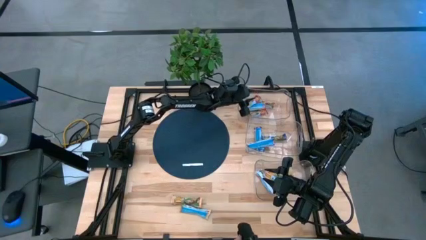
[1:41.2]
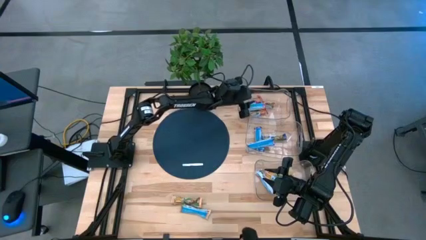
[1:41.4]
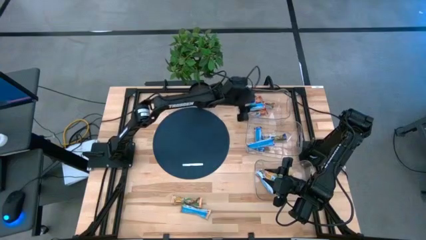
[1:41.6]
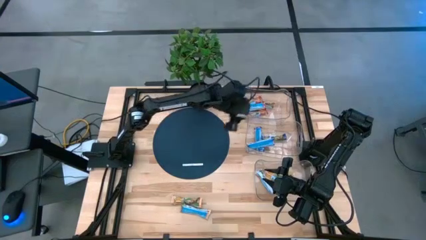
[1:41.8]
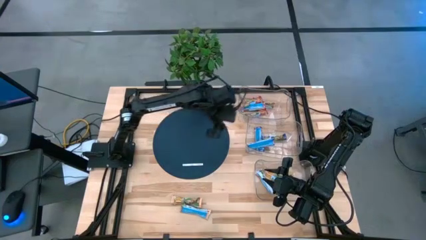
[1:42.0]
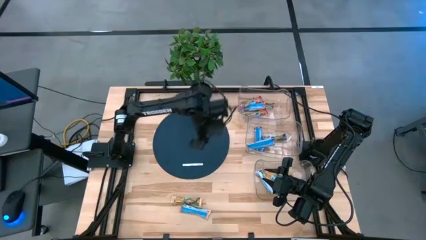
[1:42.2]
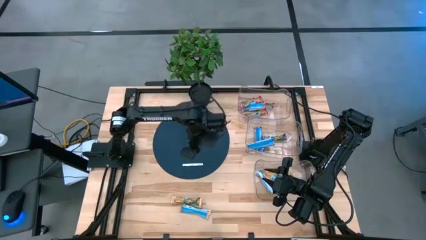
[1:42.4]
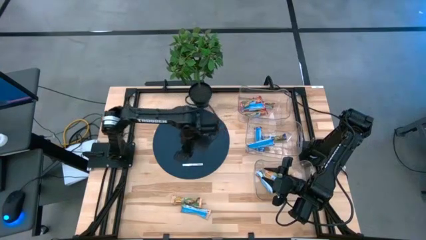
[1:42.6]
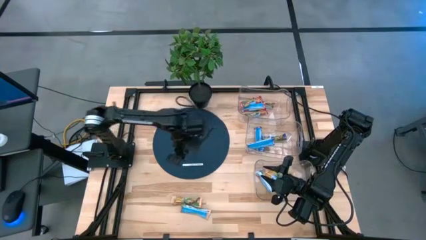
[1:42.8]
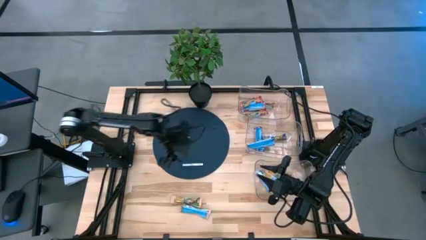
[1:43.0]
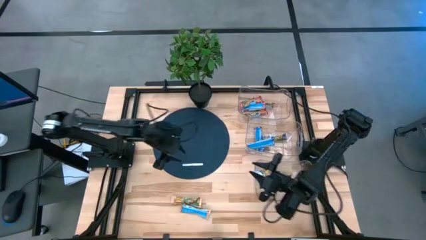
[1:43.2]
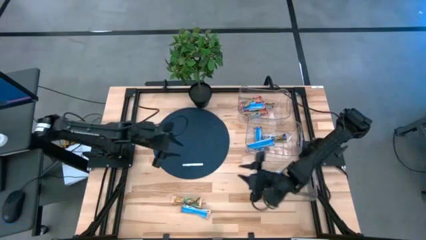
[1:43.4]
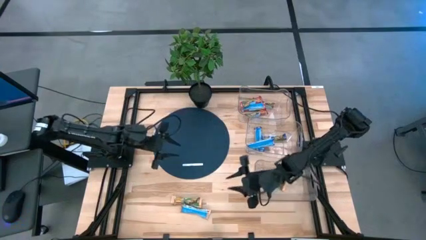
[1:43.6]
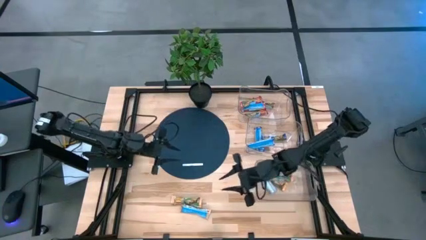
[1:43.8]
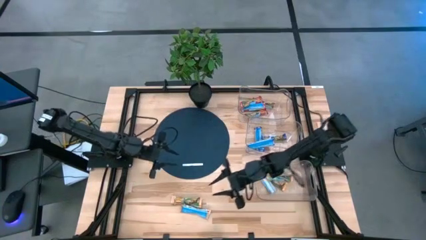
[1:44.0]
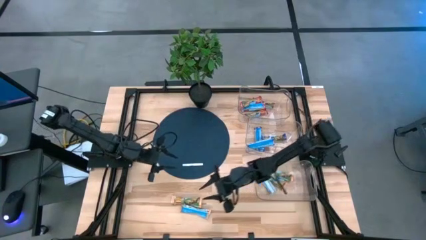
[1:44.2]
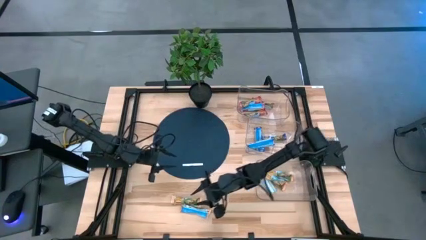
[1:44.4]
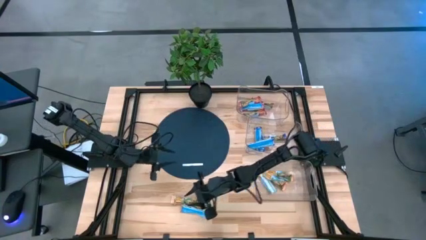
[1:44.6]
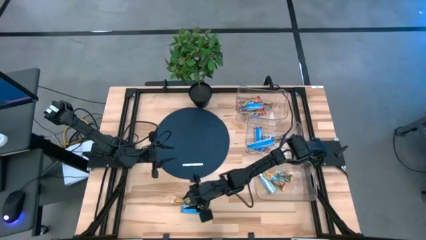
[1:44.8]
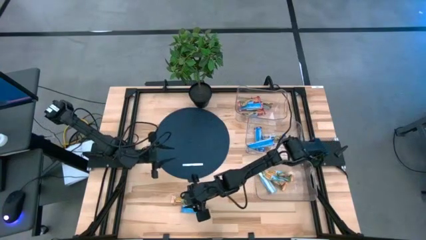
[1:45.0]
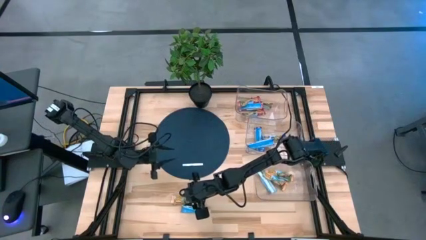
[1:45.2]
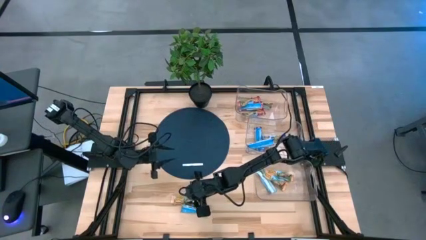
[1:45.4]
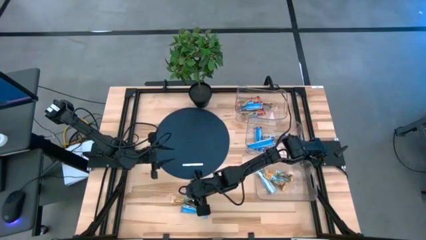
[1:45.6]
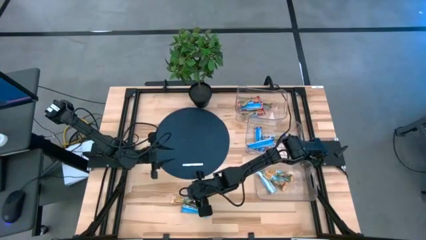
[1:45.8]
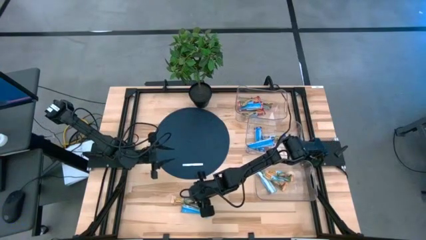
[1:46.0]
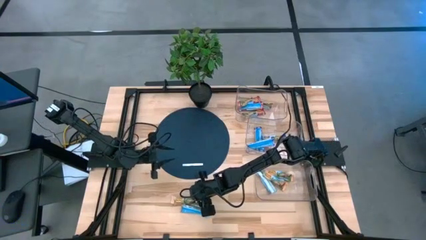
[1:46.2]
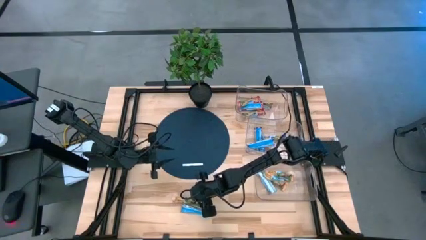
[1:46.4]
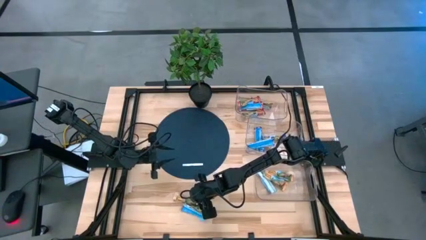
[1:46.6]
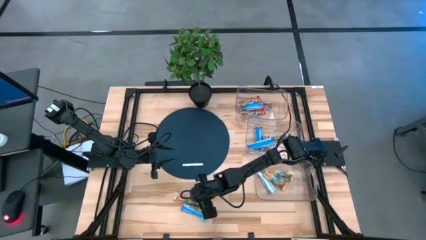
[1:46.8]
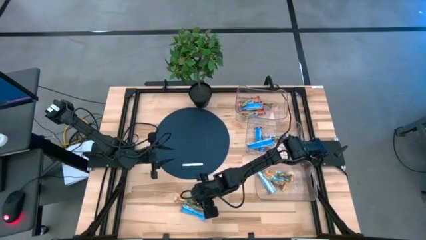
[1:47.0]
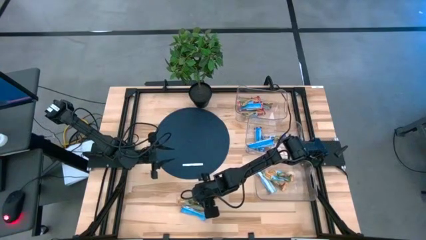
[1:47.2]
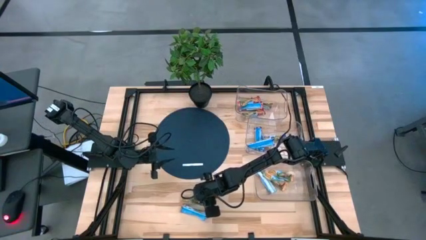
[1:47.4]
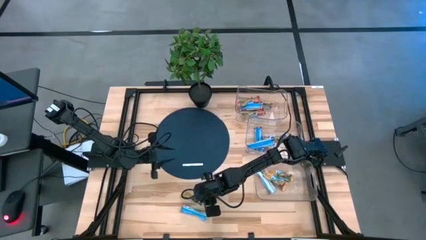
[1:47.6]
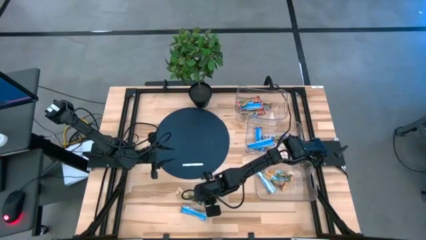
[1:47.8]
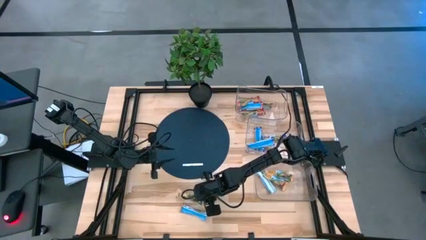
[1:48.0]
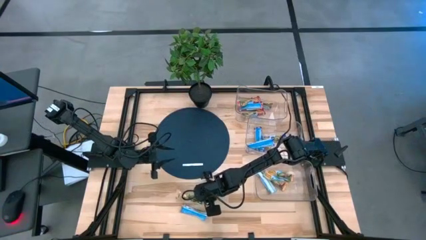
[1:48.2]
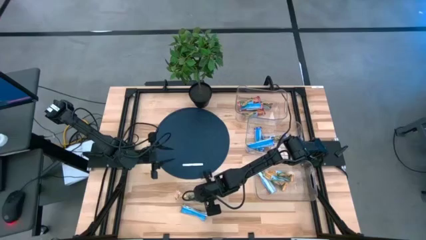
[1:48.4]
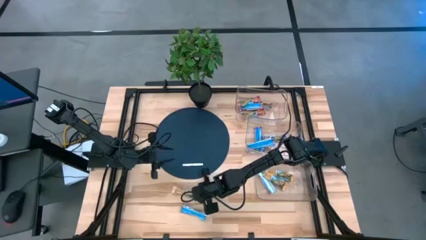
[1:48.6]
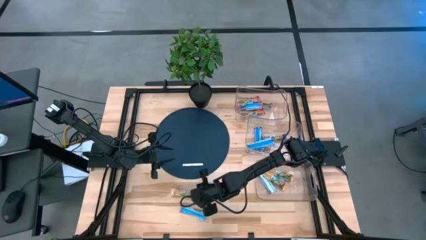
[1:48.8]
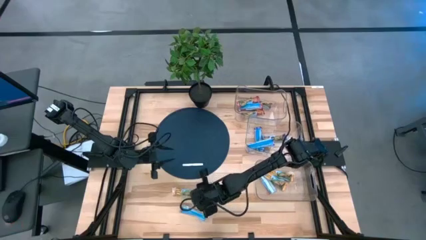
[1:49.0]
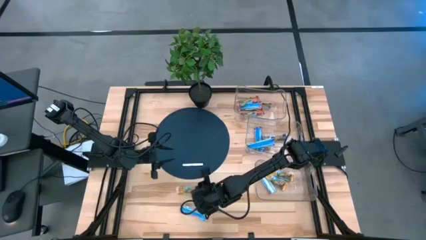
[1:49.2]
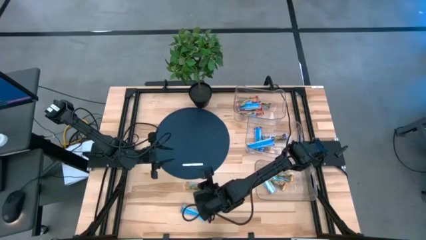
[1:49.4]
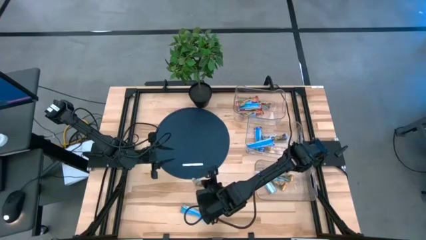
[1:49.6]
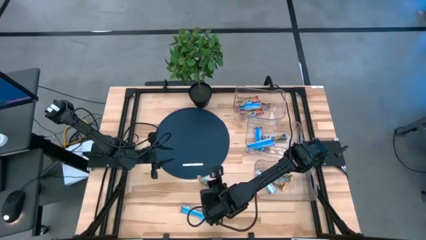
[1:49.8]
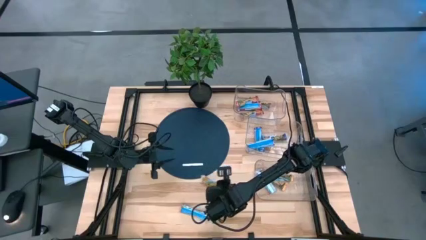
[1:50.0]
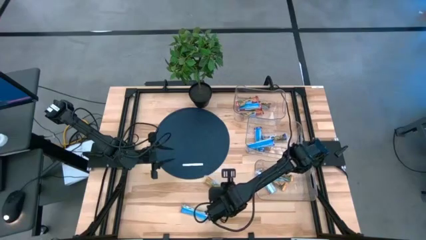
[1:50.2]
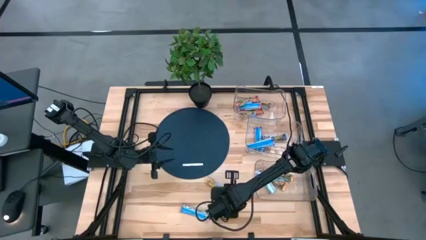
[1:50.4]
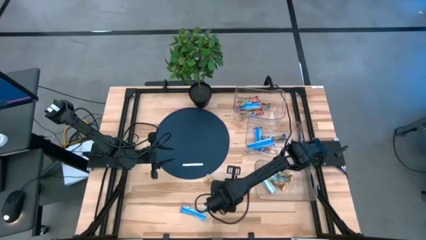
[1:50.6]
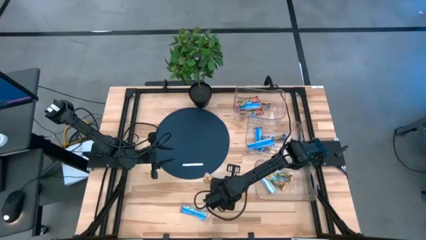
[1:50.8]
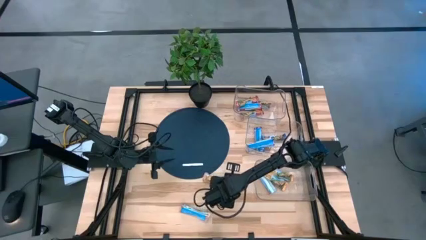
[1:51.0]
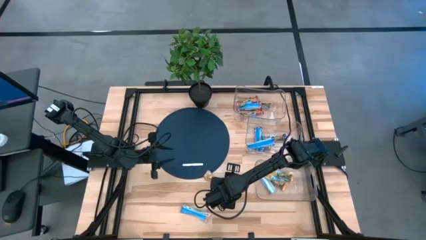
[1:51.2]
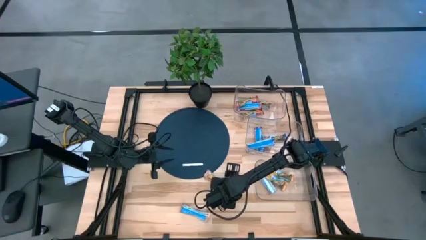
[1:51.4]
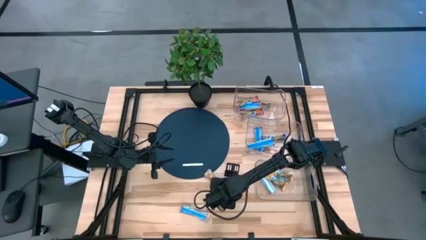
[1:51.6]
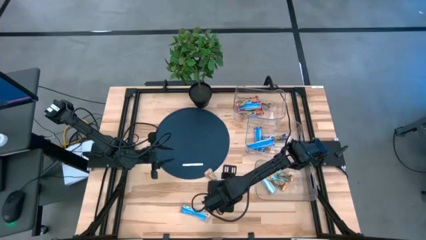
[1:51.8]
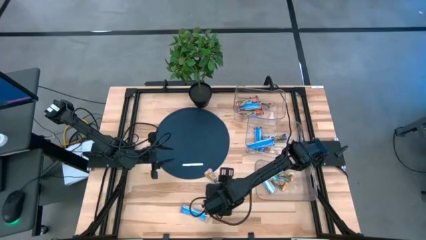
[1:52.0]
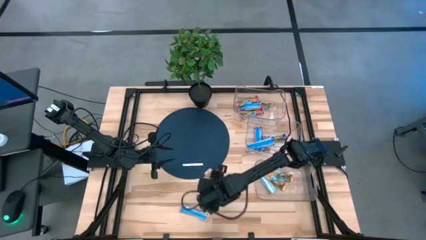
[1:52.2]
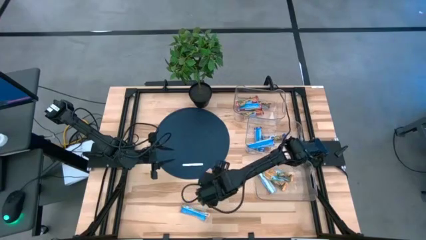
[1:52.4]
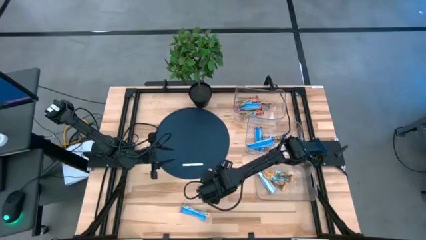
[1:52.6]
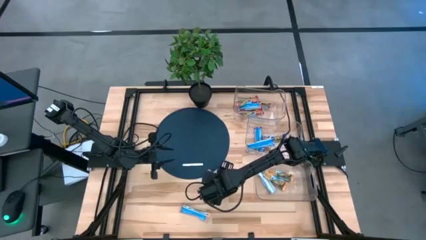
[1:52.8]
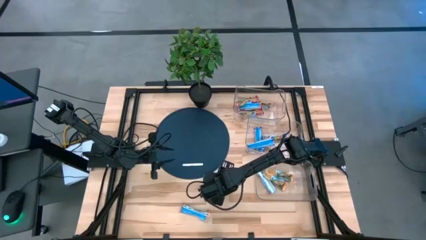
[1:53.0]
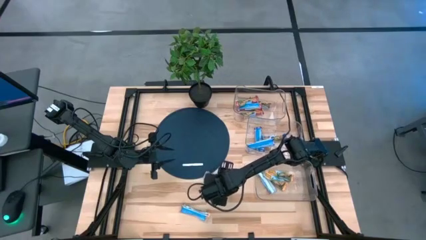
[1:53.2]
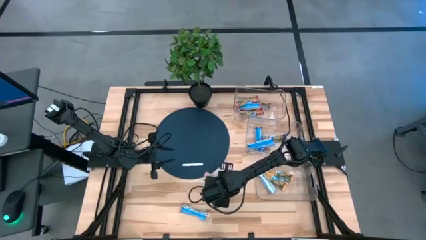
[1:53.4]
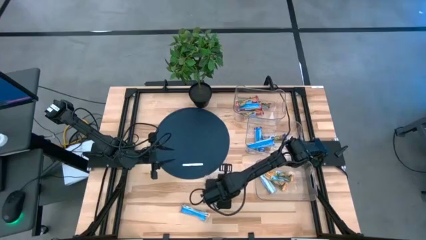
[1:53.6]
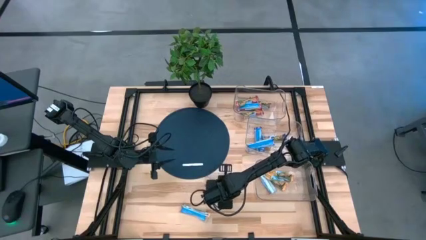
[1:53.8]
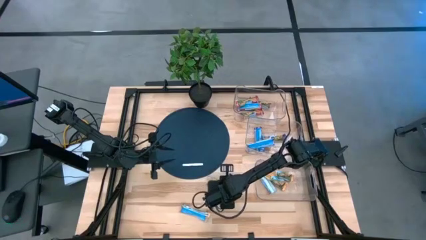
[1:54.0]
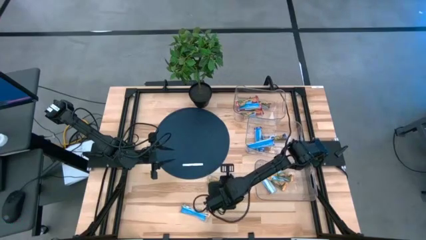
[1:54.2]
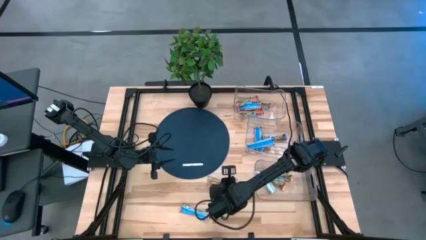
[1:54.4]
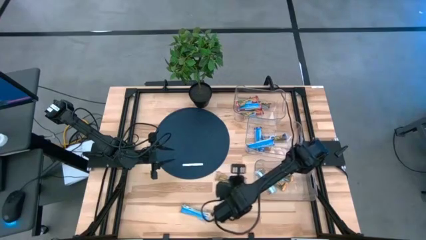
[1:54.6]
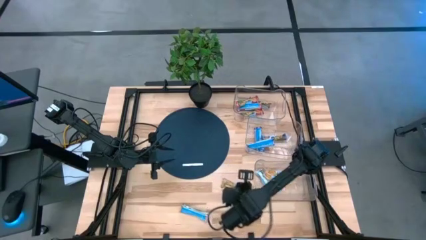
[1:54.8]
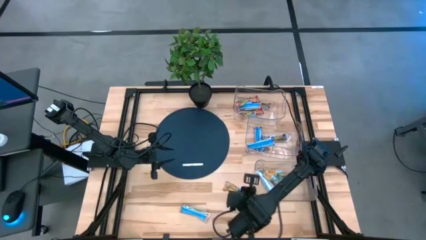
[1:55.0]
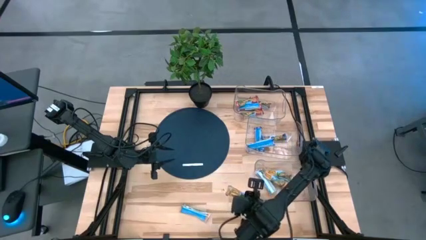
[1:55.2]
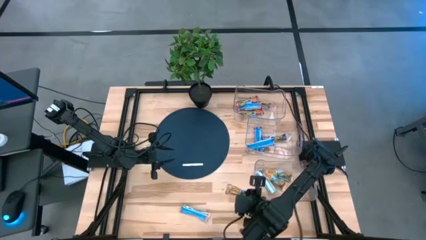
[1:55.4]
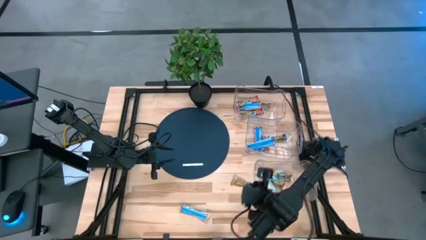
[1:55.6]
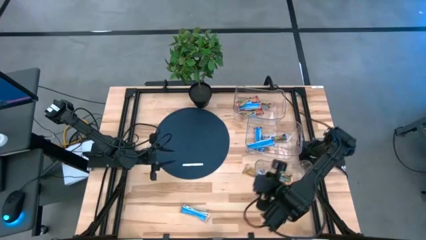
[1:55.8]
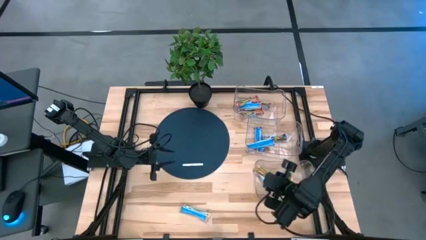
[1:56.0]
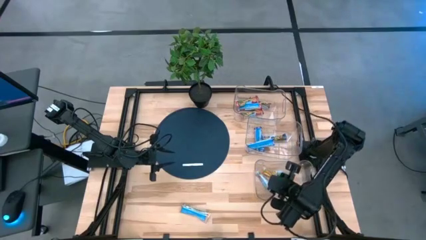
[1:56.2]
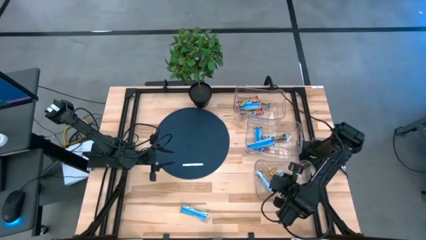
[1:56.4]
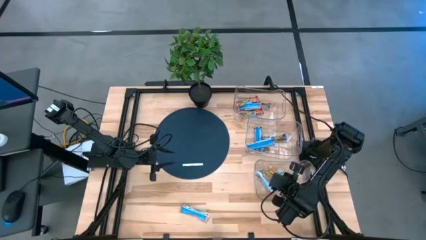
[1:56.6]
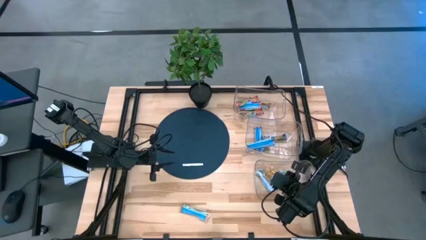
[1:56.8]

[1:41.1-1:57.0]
Task: Pick and place Granola Bars by type
Put the yellow granola bar into the bottom transparent bin

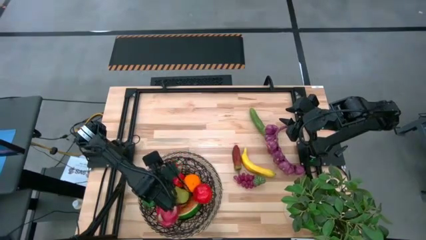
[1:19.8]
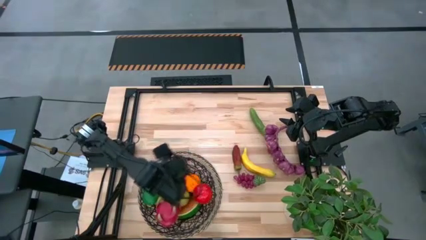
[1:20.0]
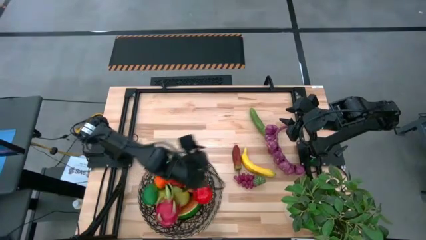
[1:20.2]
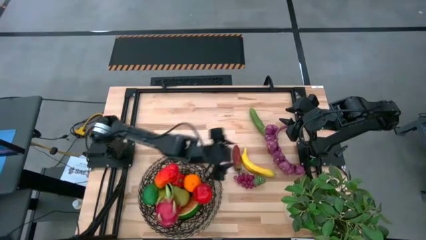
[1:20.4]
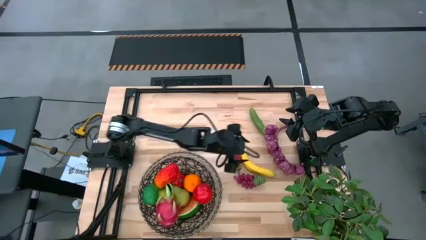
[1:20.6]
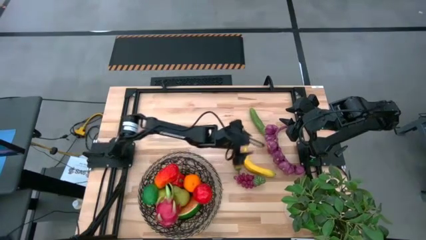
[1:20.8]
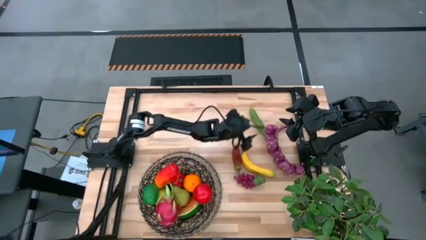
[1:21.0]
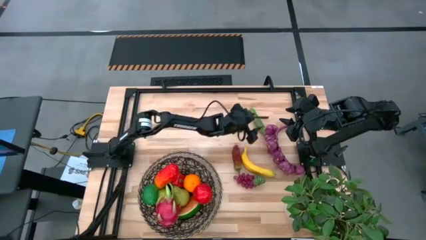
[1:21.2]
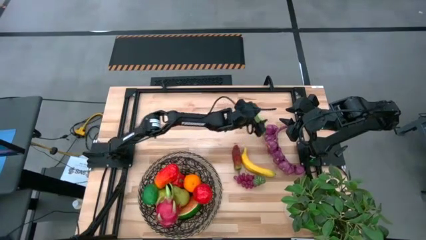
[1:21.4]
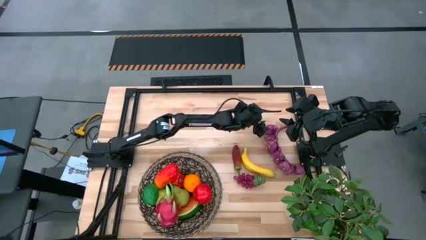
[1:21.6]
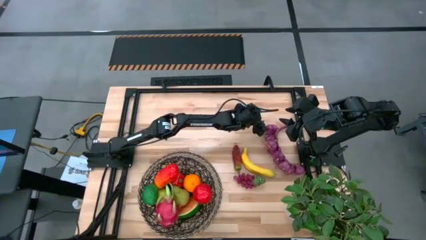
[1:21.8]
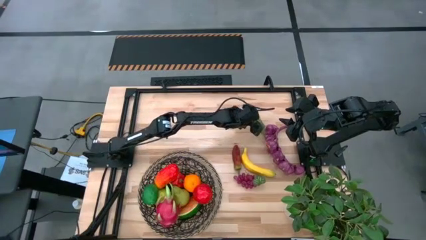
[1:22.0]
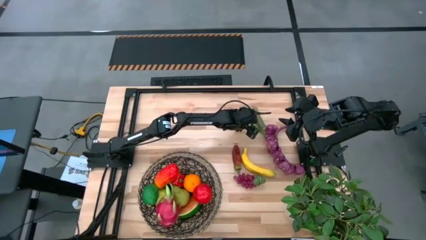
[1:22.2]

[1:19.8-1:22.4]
Task: Build produce basket
Put the cucumber into the woven basket
